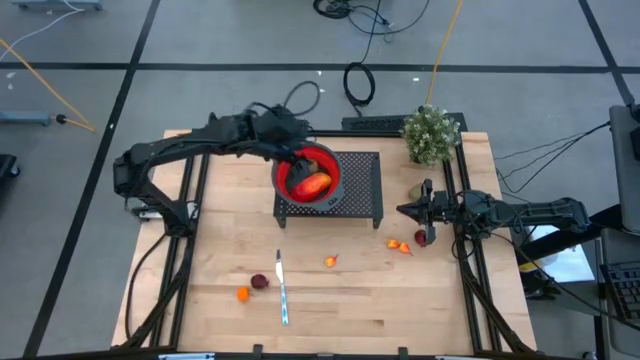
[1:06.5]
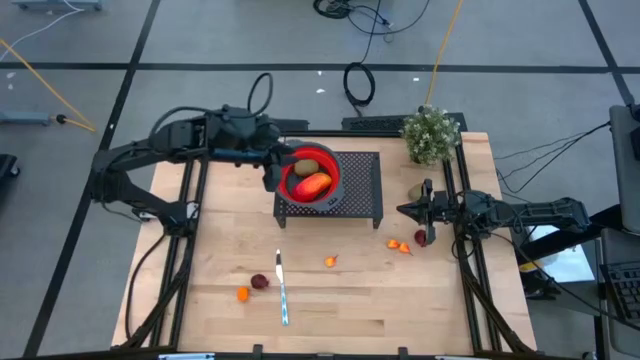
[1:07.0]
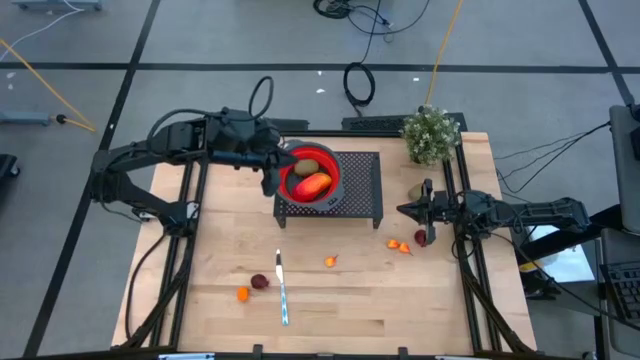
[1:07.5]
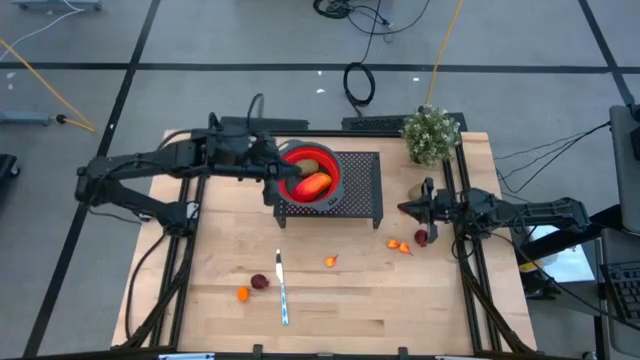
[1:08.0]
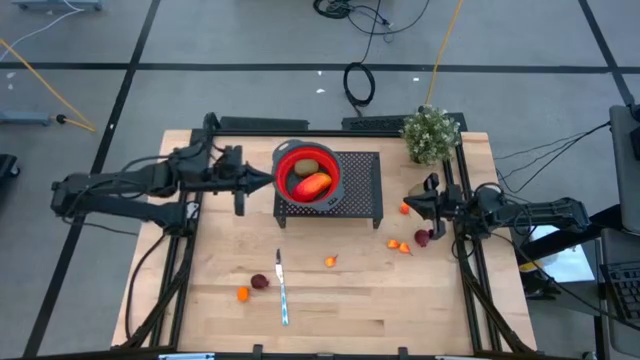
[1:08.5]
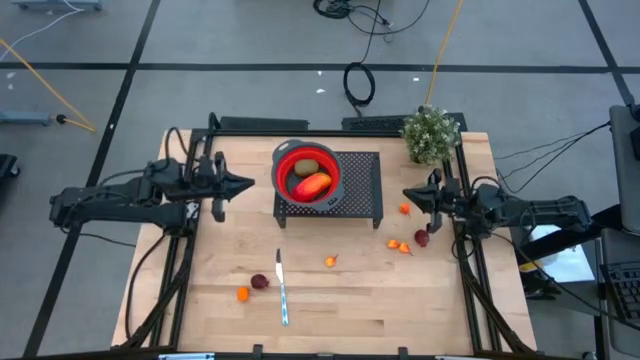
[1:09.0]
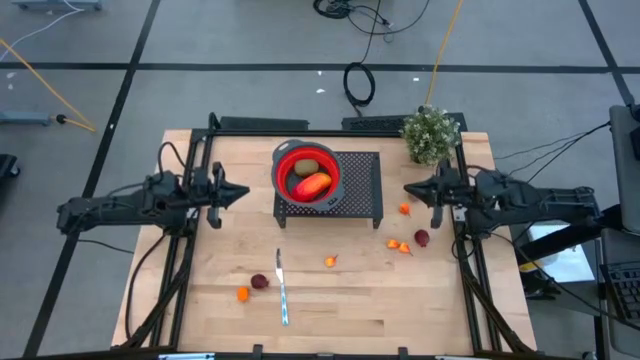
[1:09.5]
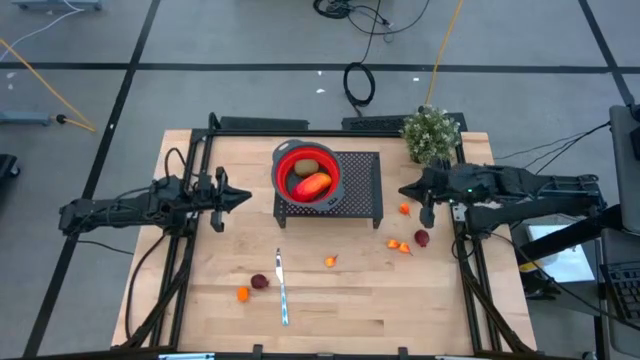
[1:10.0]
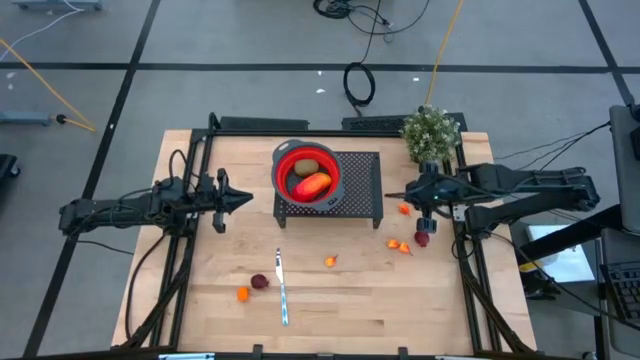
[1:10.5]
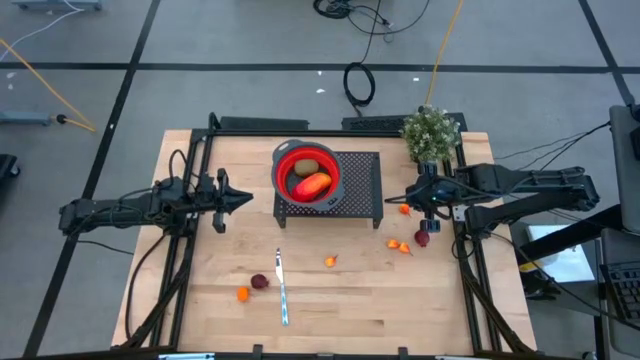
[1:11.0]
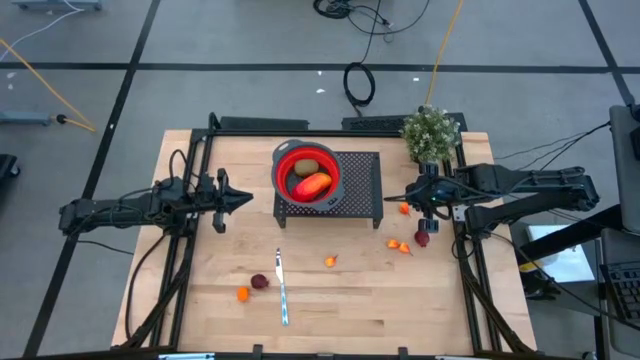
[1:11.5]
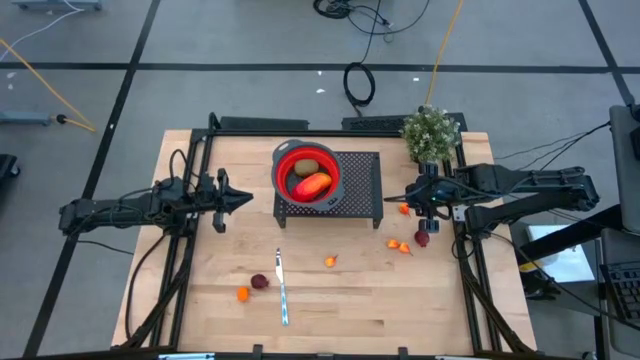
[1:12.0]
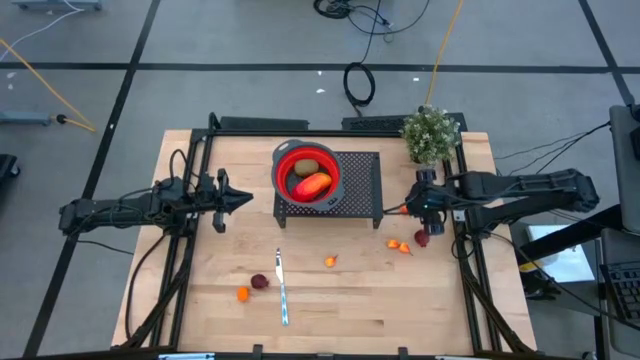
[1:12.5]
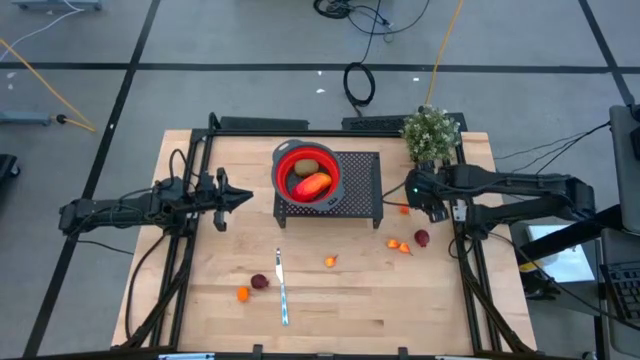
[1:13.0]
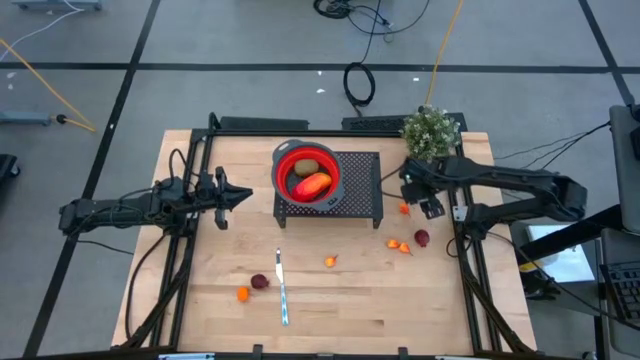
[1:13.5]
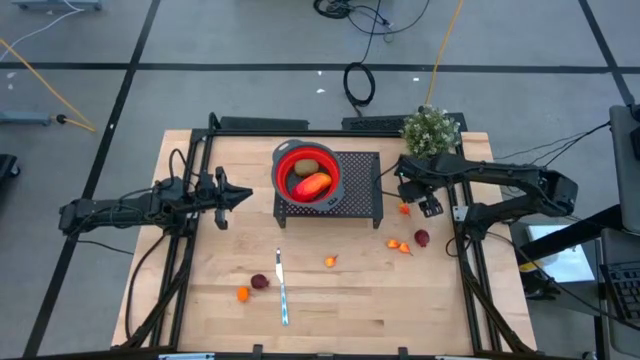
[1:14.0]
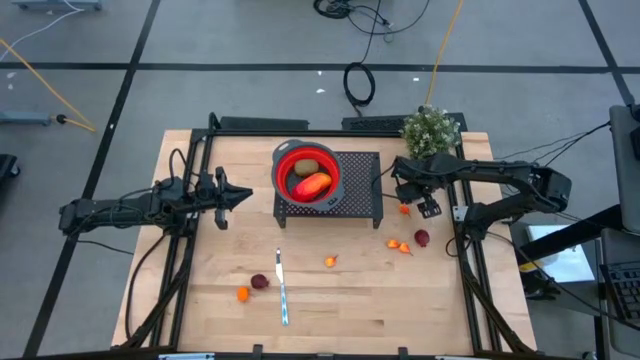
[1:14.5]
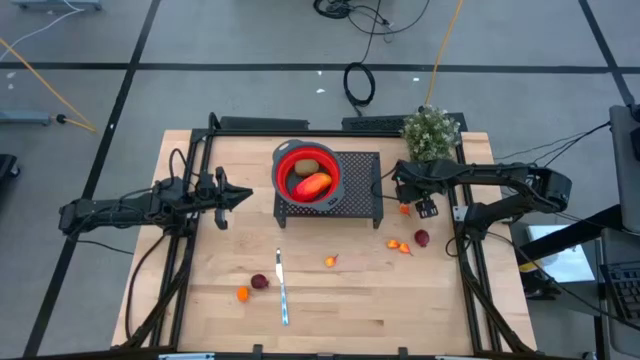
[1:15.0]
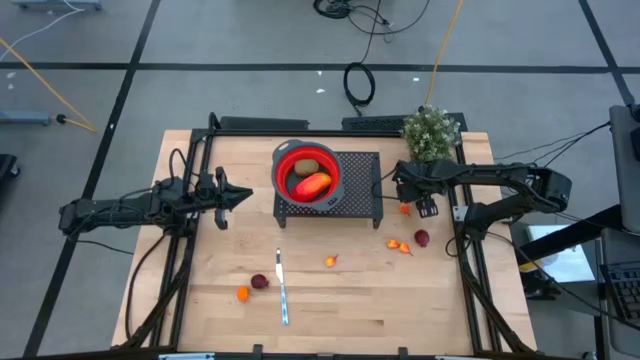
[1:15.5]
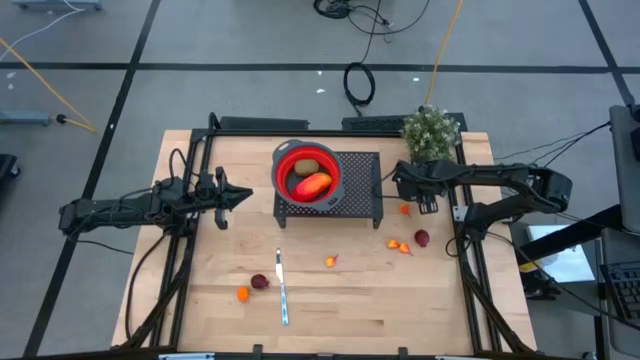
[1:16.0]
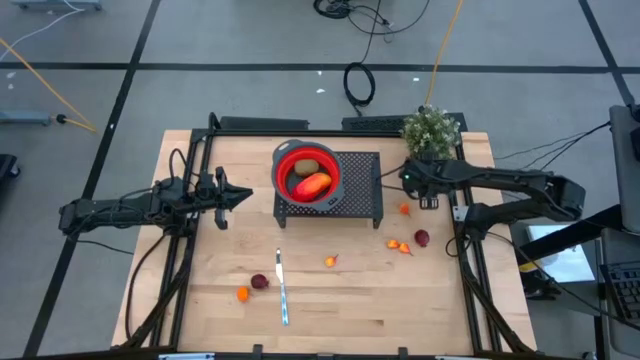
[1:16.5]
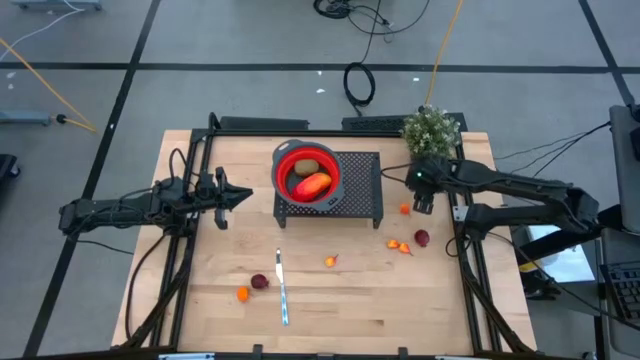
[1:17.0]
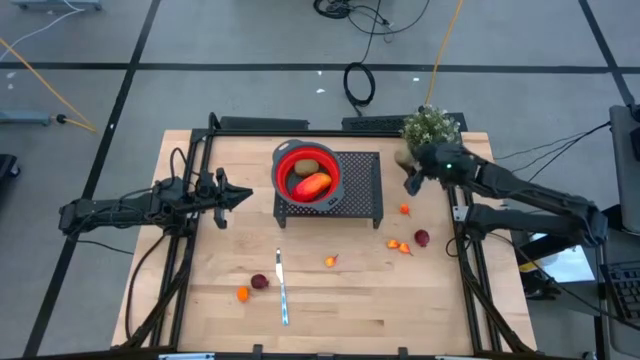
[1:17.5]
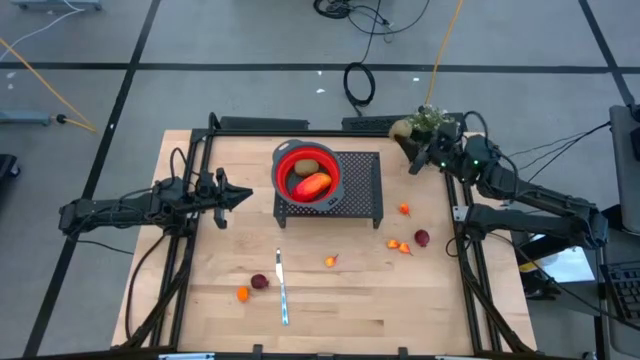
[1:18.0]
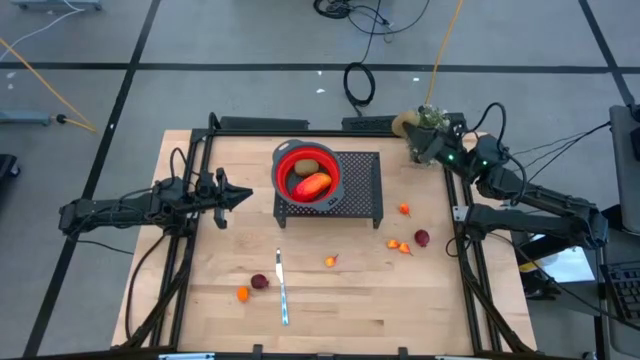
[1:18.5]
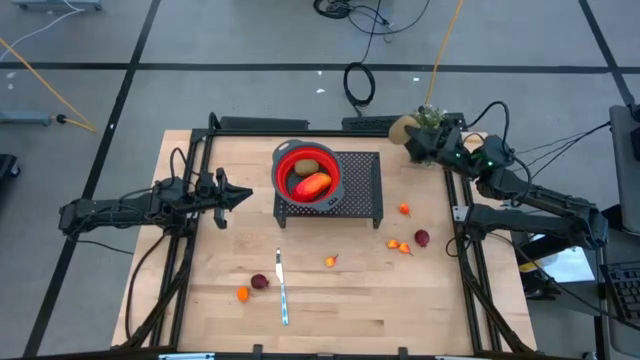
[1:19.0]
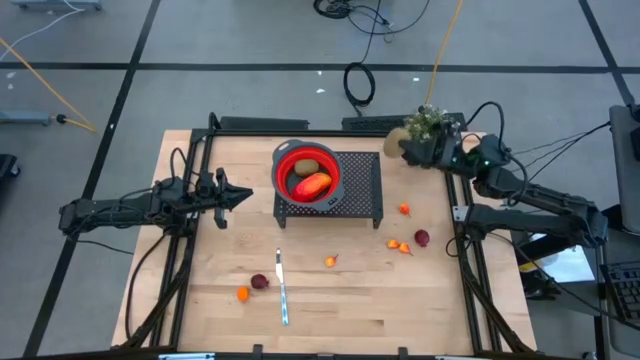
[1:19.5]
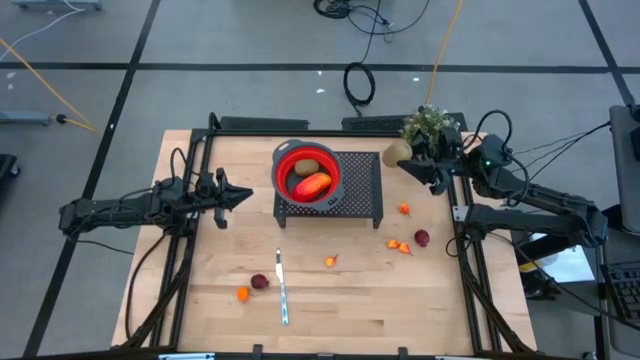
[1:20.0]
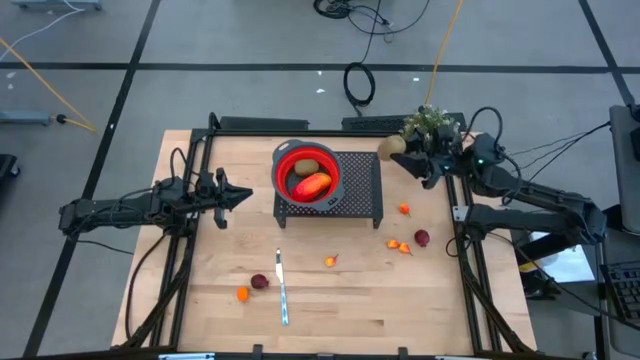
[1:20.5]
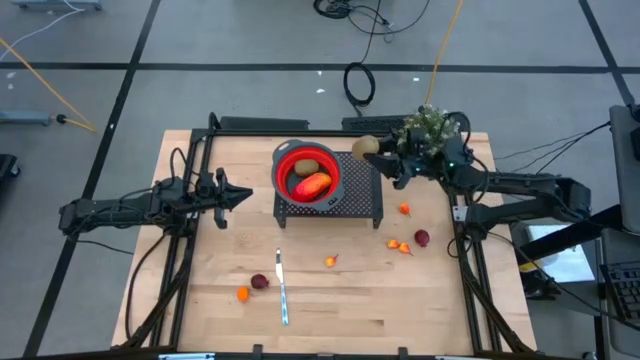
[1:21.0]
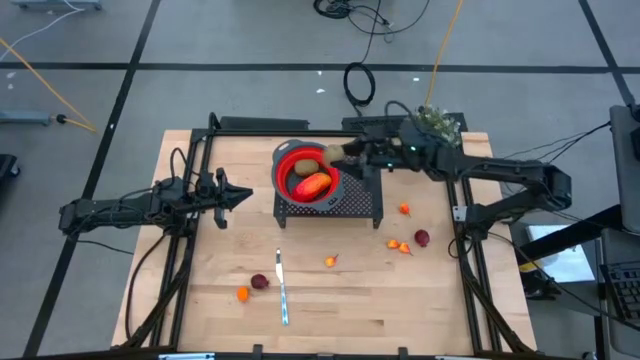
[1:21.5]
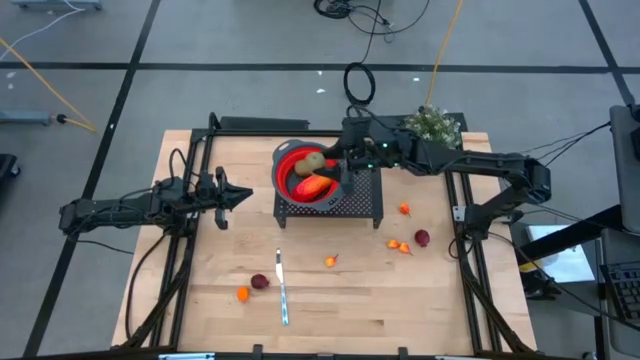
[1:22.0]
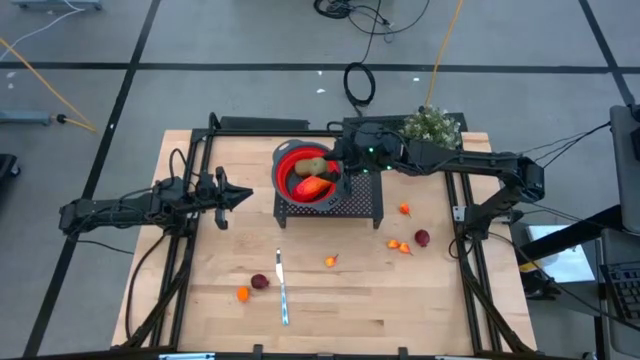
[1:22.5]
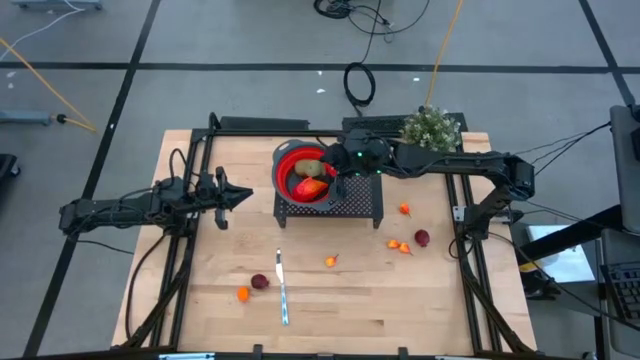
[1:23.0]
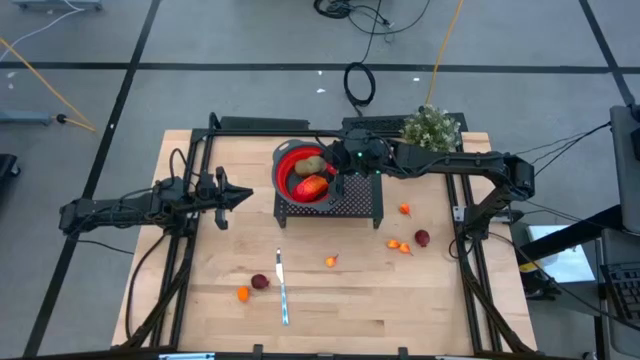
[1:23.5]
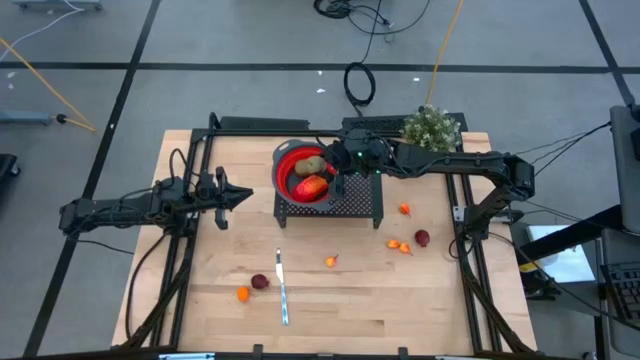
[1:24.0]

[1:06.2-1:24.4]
Task: Pick & Place Fruit
Put the kiwi into the strainer on the shelf

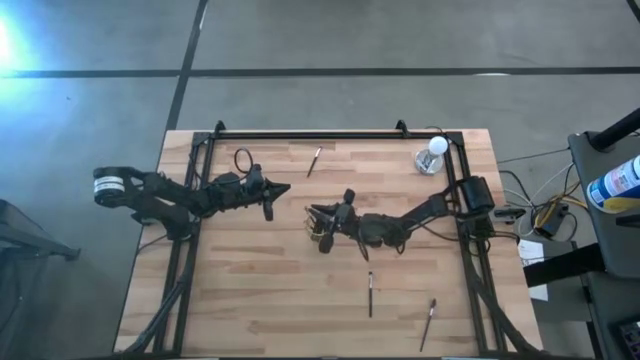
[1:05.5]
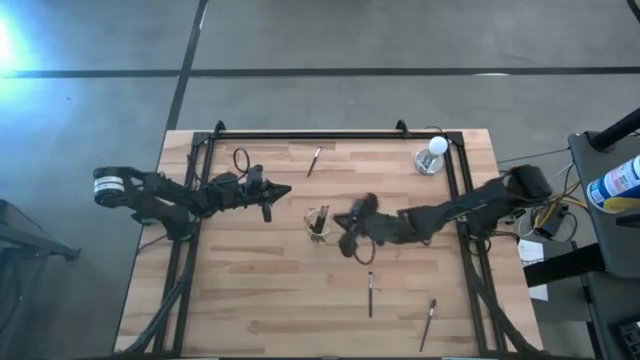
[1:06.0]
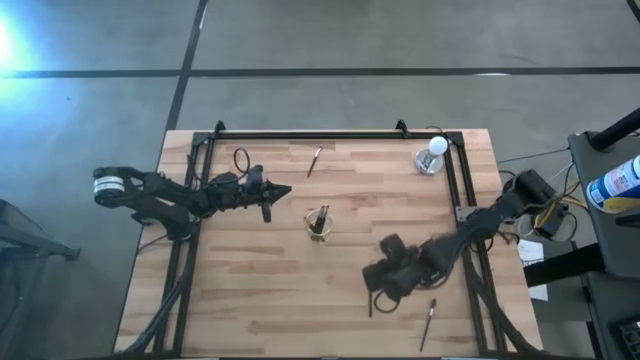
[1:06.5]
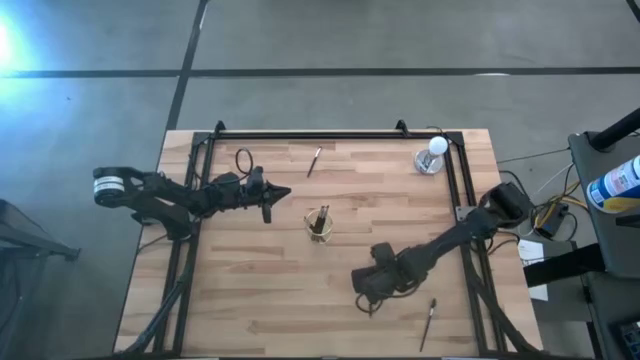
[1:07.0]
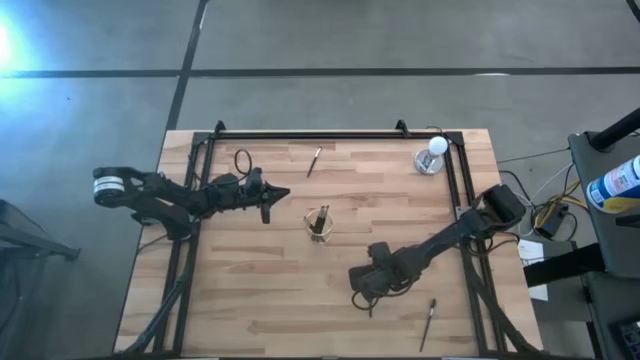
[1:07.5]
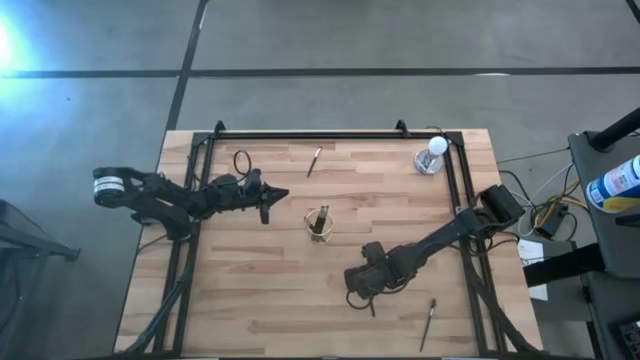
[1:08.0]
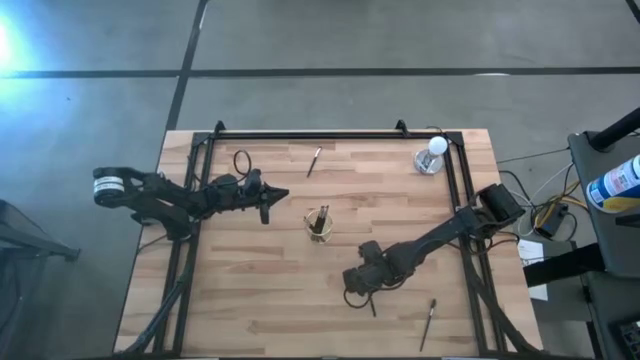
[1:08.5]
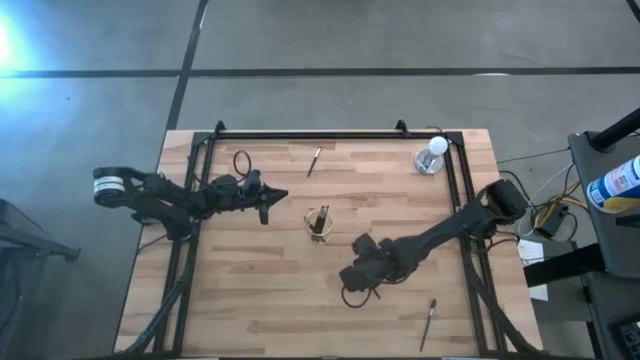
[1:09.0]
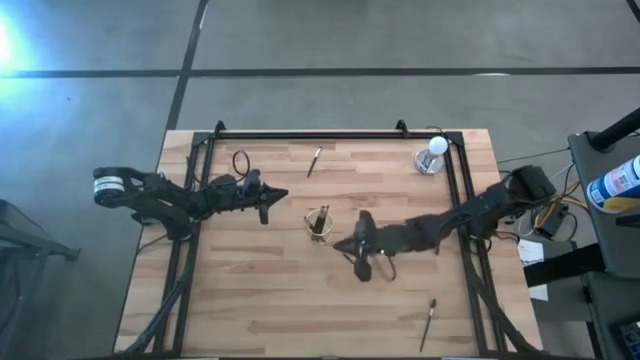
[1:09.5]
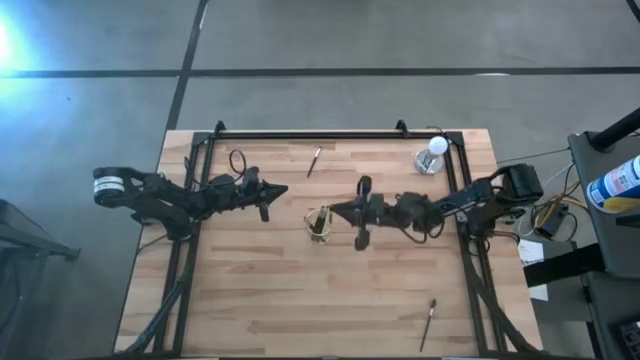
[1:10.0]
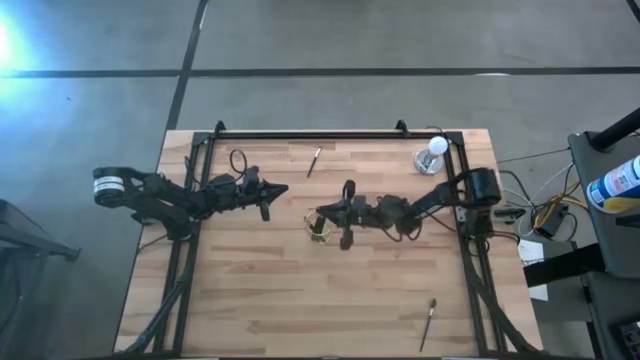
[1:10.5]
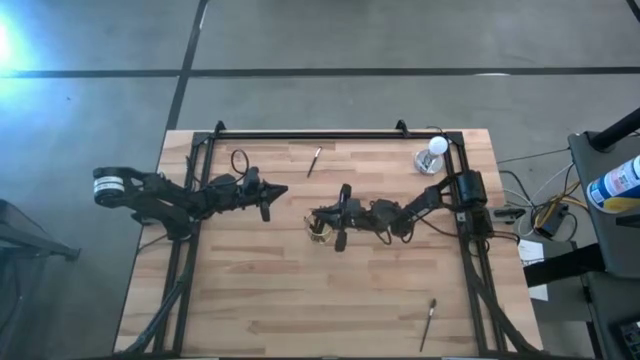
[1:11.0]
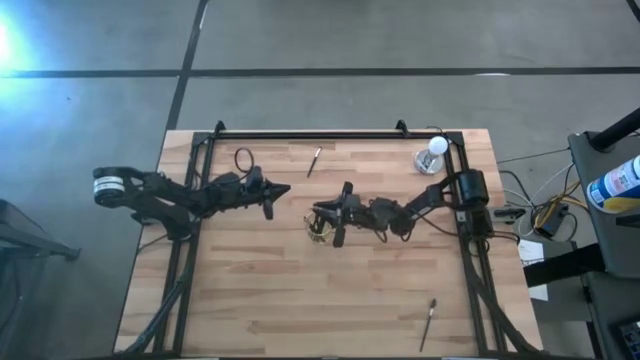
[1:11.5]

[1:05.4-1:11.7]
Task: Pick & Place Makeup Brushes
Put the eyeshadow brush into the gold makeup brush holder
